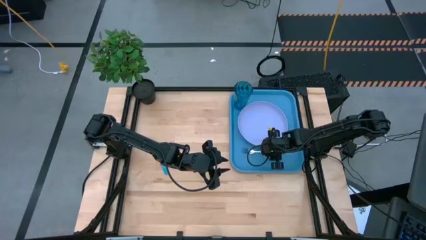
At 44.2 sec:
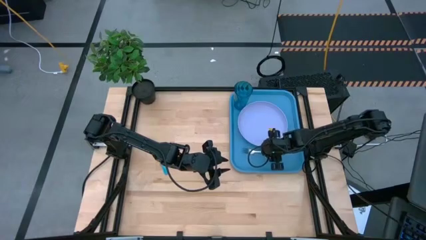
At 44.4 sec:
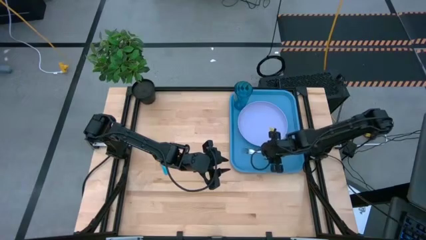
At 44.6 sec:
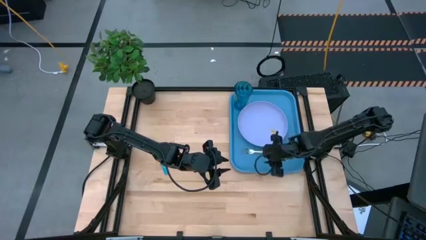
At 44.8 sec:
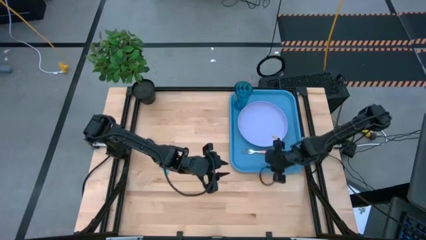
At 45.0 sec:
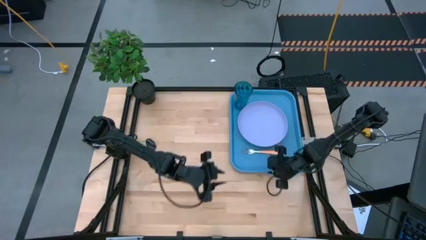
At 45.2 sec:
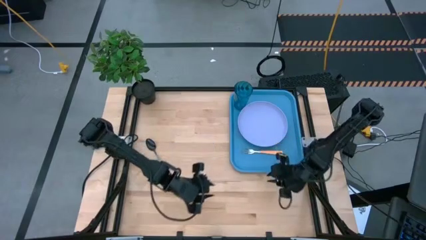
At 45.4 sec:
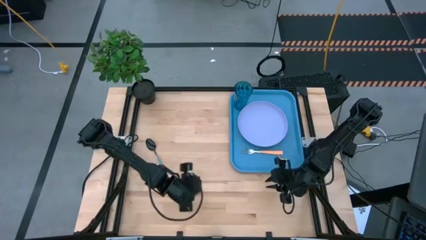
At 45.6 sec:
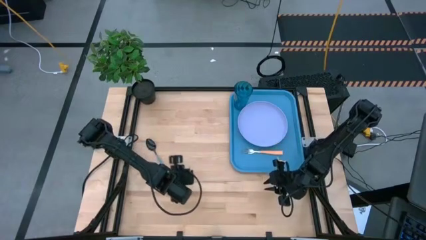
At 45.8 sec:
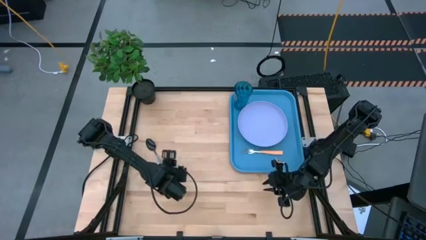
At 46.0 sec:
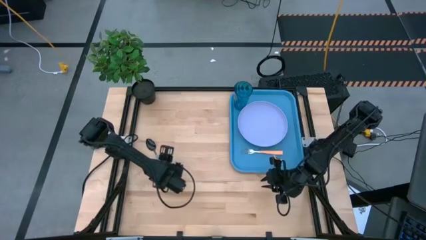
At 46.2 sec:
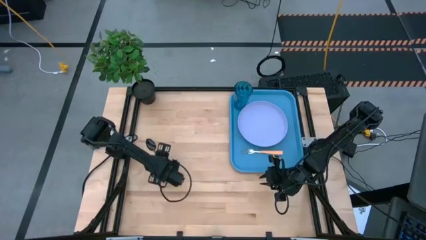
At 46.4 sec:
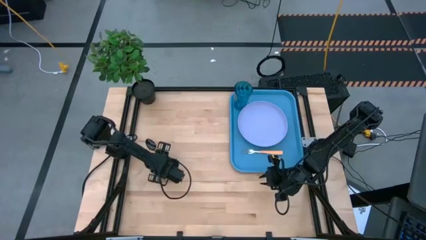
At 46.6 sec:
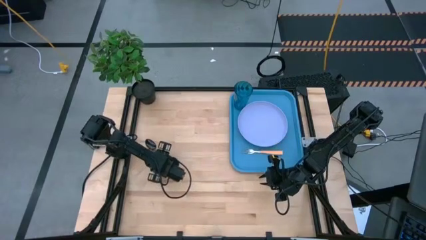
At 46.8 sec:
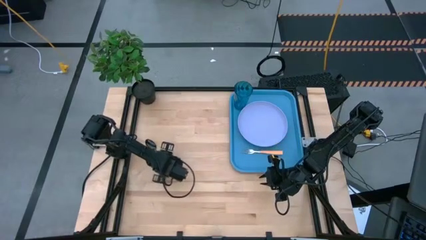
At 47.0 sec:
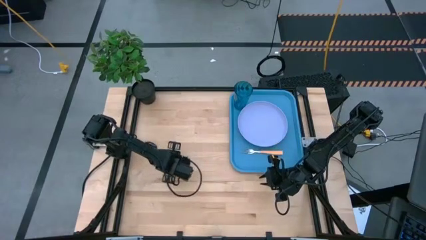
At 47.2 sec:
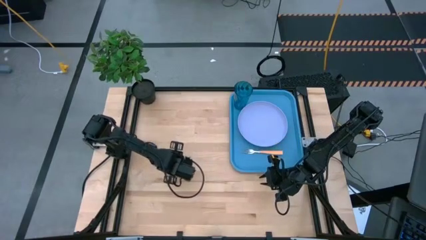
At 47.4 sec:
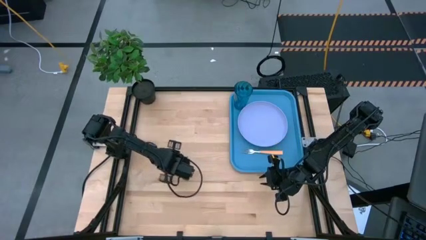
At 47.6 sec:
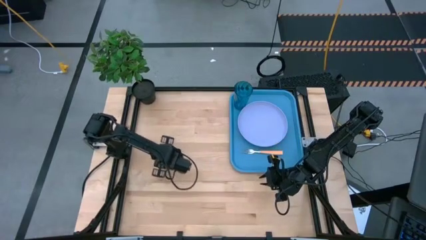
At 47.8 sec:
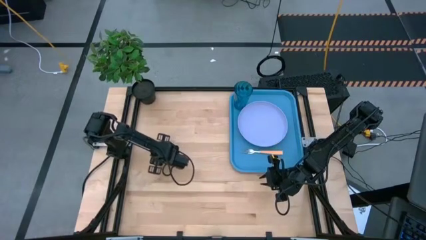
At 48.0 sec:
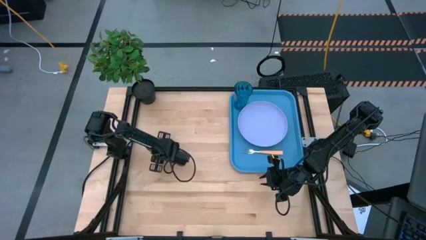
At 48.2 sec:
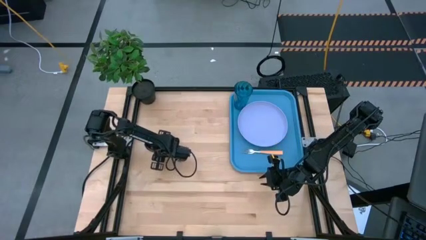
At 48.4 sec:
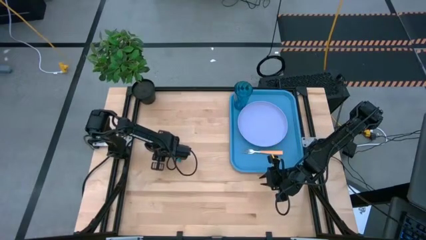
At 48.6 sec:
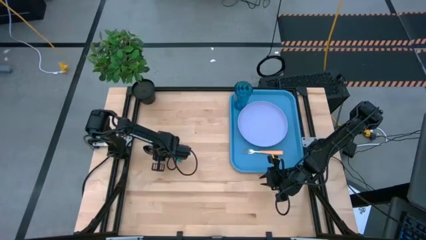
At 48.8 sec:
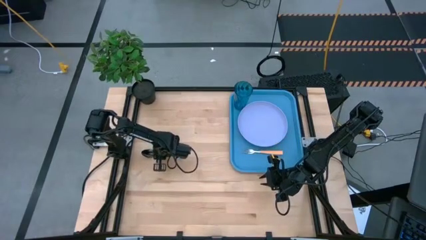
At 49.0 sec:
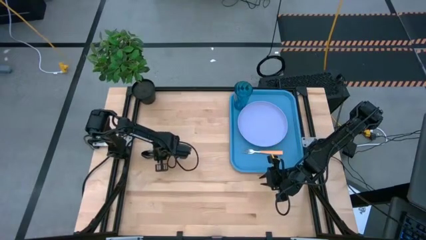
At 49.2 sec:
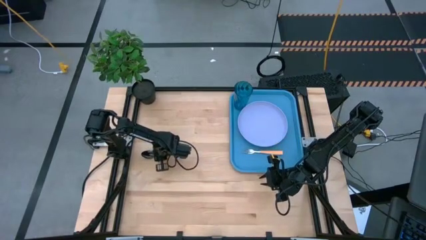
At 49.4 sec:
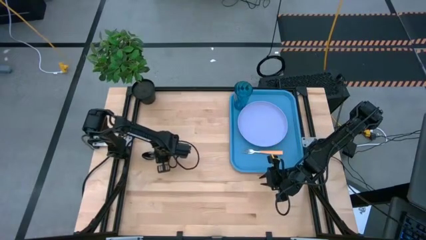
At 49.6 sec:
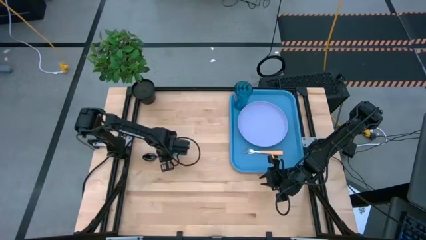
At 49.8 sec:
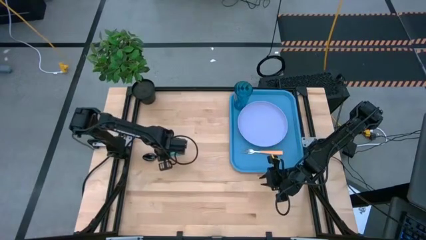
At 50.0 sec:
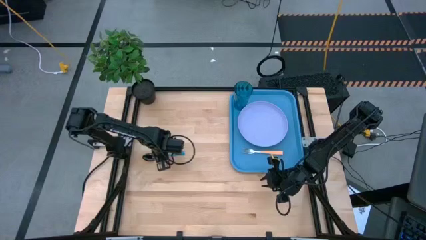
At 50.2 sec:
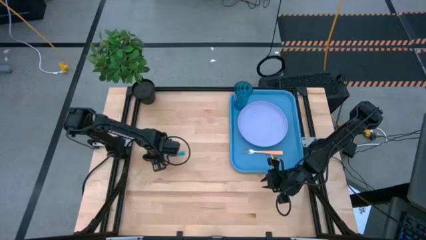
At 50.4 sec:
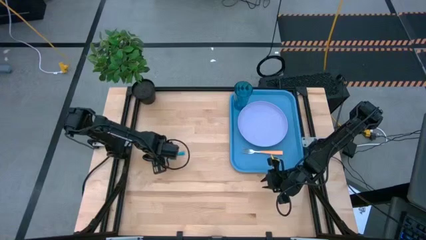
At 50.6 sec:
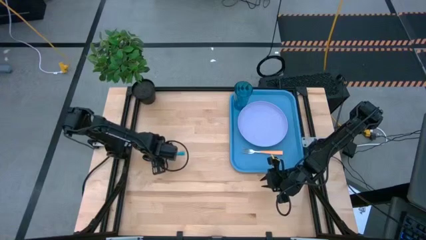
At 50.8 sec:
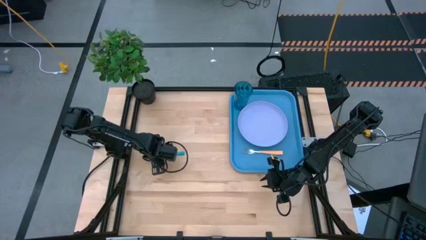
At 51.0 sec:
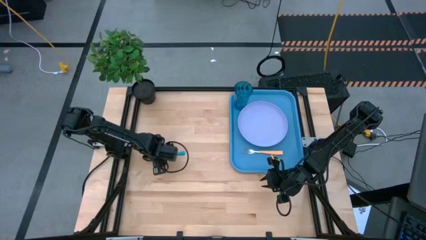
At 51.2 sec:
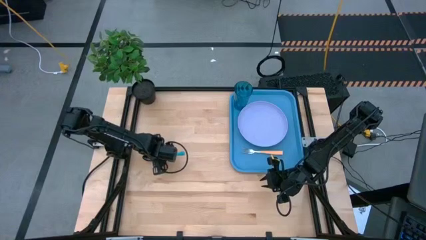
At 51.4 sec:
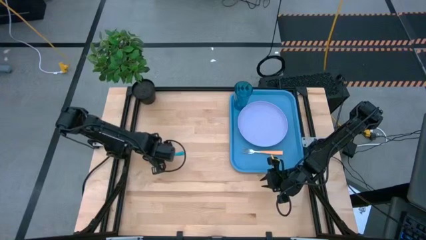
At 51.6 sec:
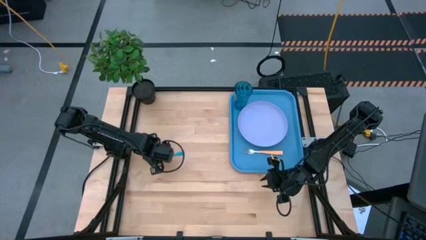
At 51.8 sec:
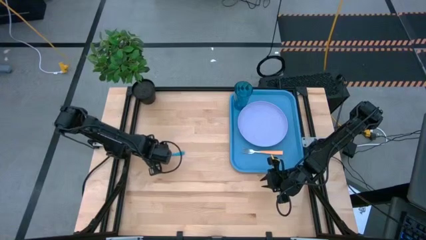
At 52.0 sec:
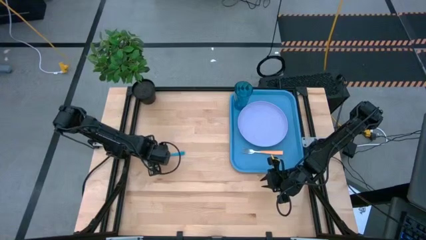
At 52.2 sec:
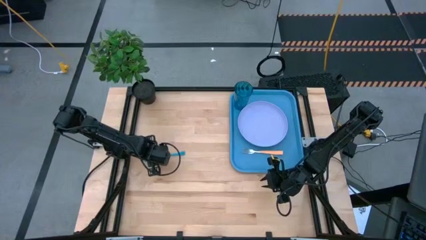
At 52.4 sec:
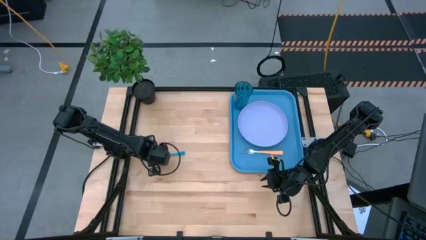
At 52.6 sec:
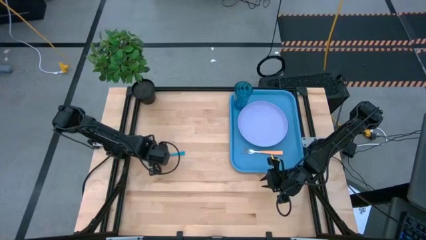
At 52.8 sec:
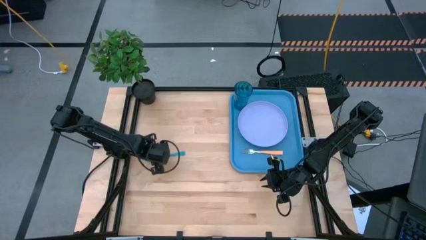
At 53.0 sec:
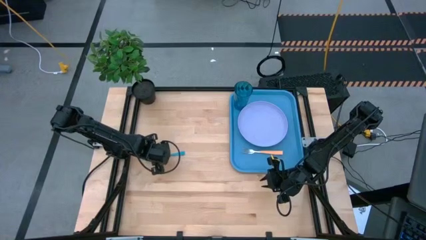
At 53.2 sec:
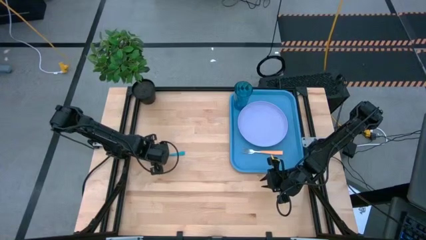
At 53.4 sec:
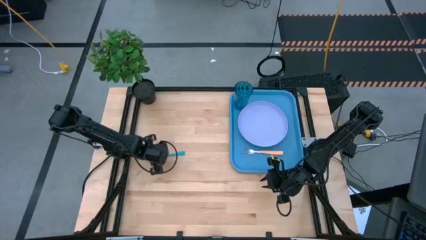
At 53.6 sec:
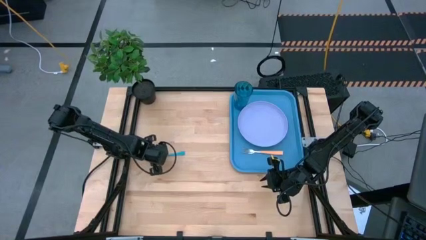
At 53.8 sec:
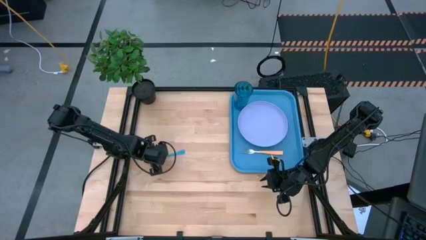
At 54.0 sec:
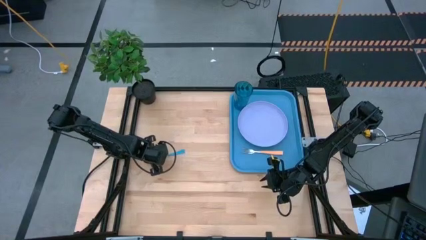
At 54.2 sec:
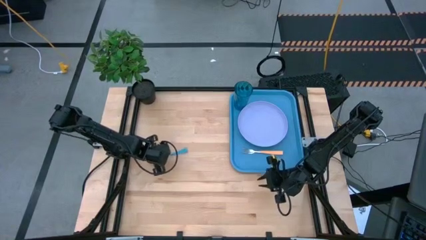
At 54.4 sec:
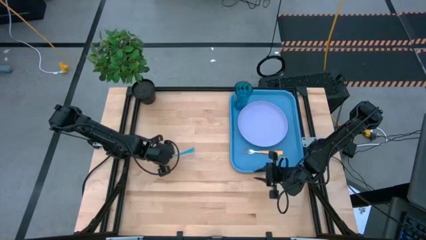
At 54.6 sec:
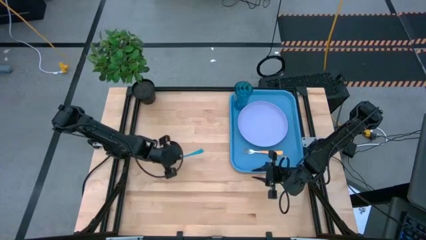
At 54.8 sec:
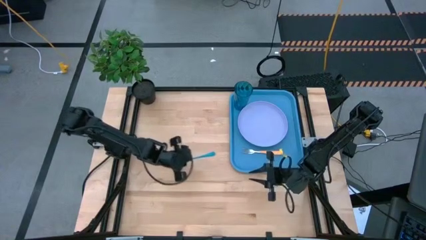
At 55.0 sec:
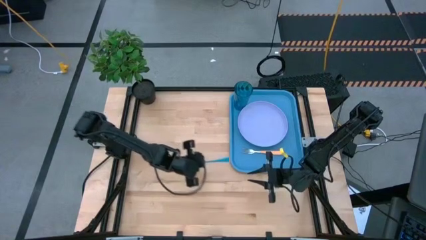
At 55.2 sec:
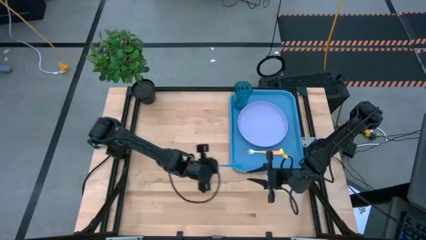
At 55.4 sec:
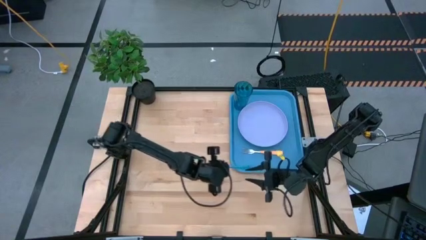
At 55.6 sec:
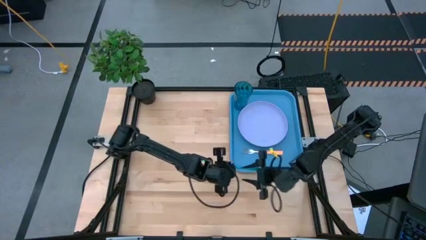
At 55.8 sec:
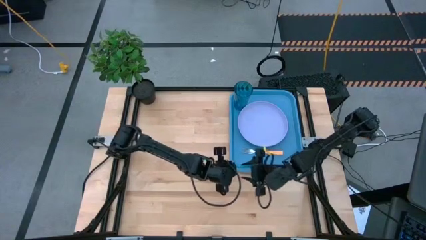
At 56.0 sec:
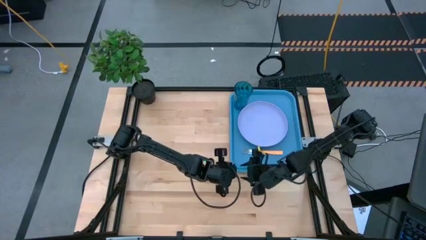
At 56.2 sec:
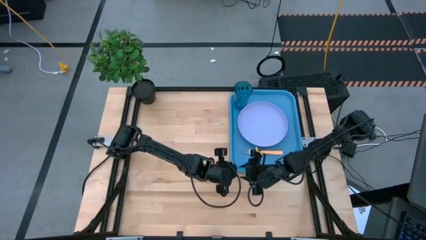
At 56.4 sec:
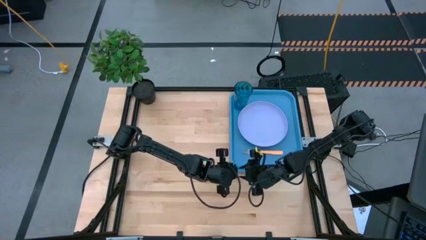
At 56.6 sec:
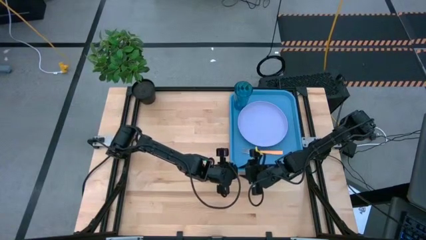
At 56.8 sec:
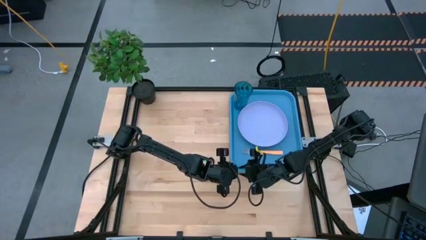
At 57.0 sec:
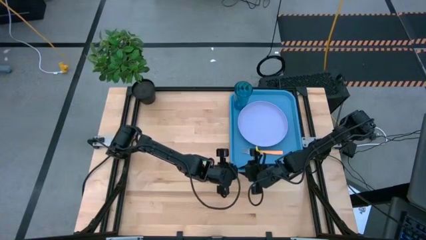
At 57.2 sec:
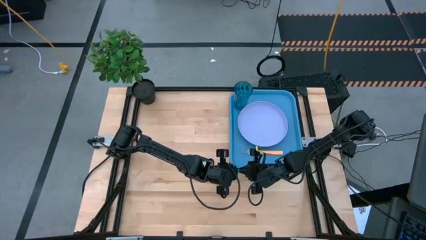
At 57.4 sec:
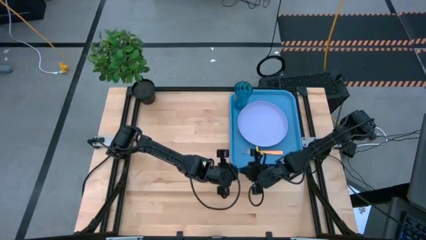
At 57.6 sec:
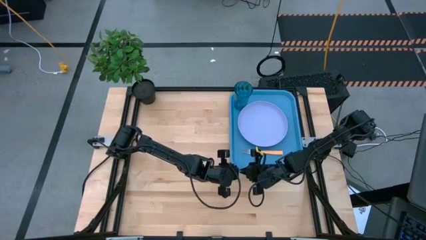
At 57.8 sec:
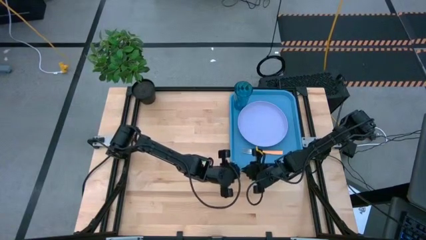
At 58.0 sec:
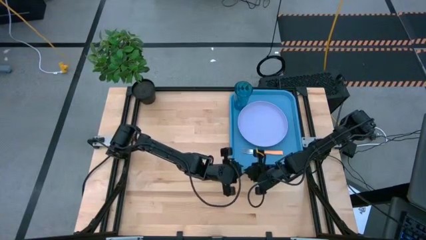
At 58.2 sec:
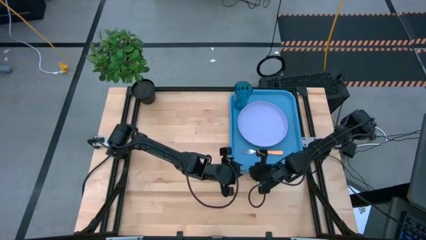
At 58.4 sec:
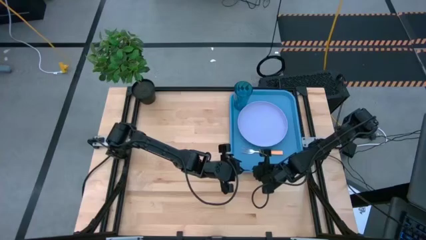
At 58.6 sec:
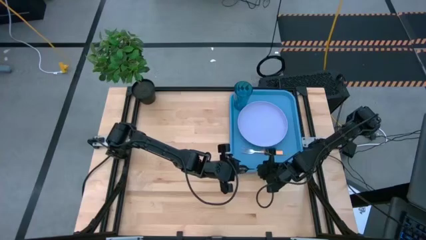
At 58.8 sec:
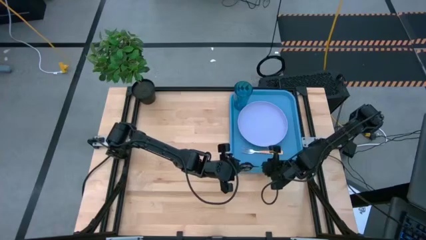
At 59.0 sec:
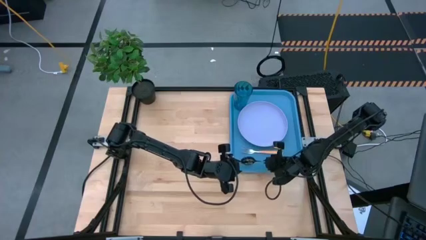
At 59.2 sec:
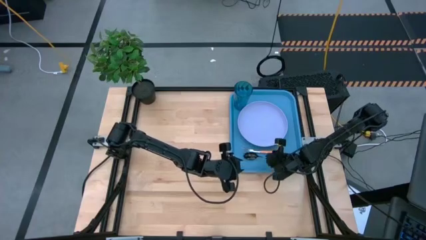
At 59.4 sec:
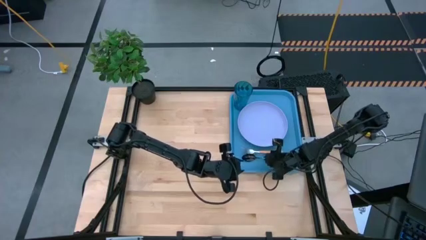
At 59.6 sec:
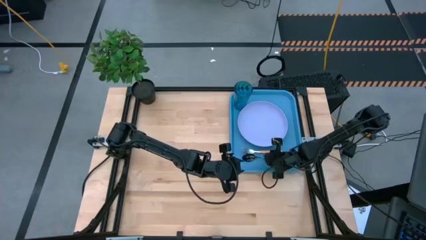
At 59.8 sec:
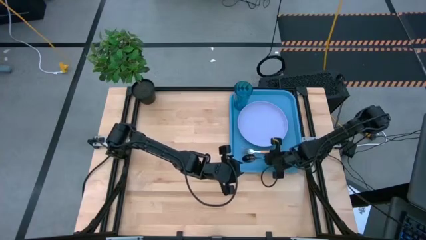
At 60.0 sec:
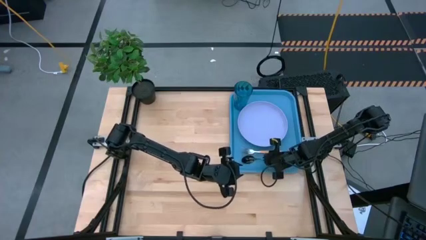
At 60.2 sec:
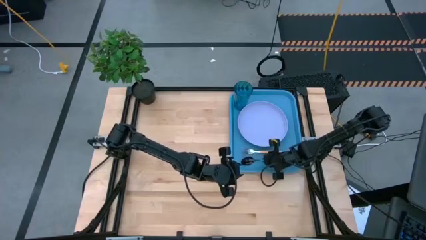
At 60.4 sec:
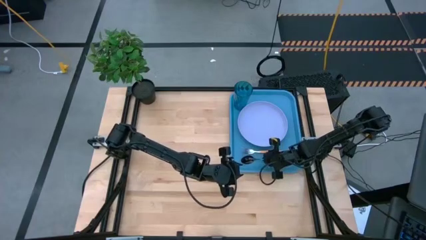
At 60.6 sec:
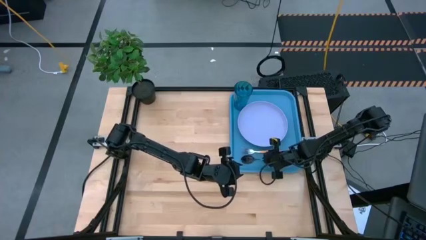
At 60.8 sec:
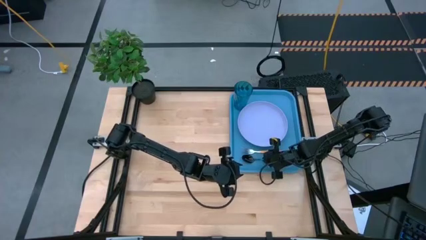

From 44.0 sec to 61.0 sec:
Task: Pick and place plate/cup/fork/spoon on tray
Put the blue spoon on the blue table tray under the brown fork
